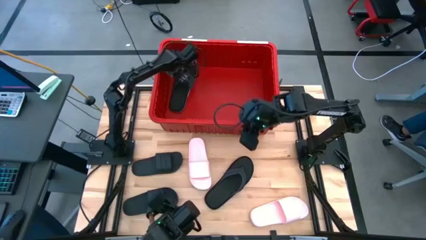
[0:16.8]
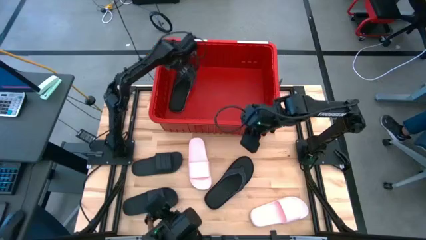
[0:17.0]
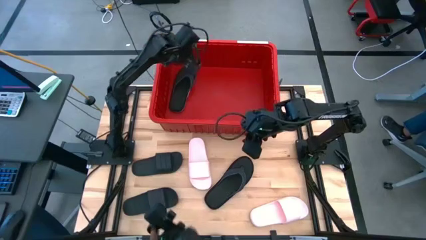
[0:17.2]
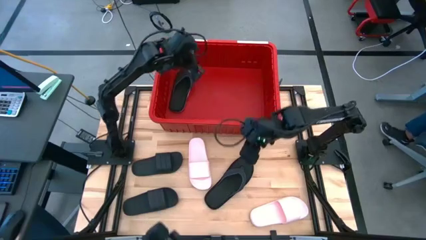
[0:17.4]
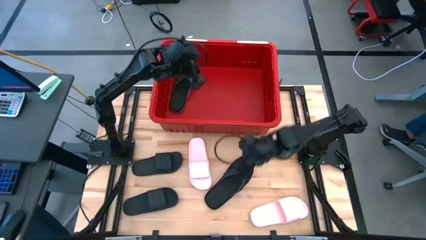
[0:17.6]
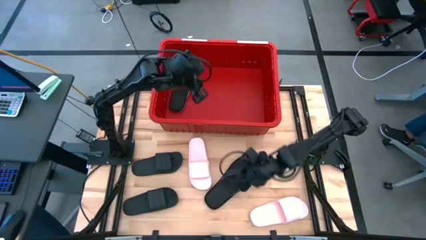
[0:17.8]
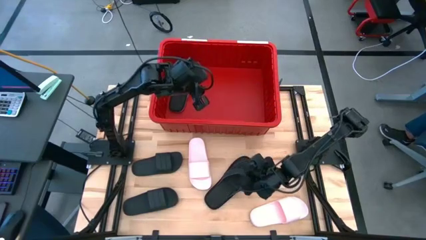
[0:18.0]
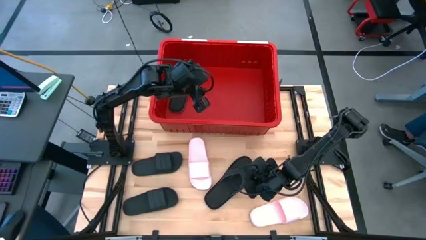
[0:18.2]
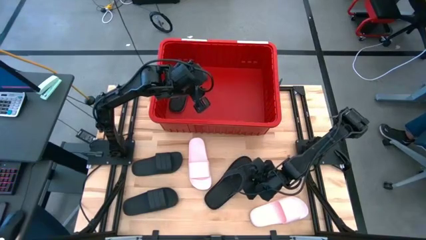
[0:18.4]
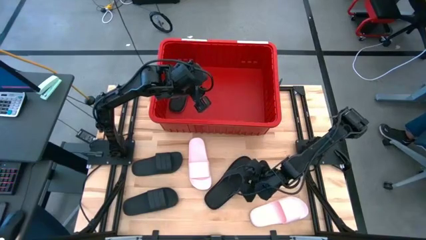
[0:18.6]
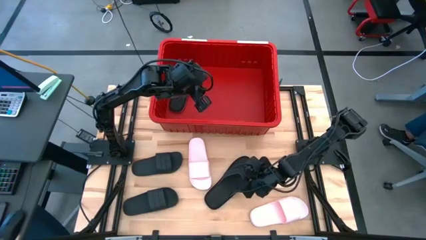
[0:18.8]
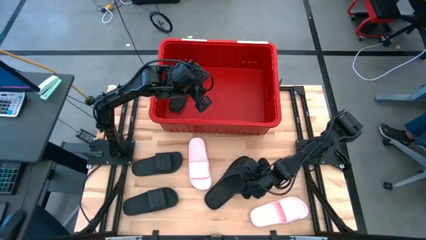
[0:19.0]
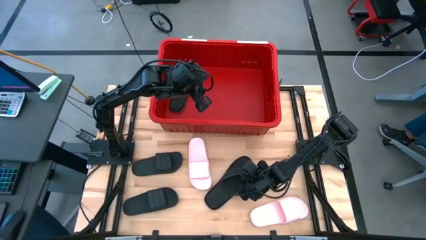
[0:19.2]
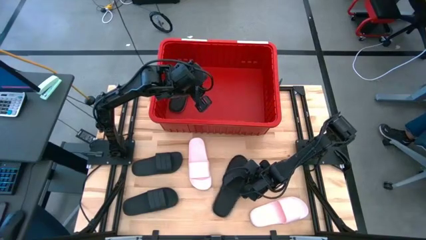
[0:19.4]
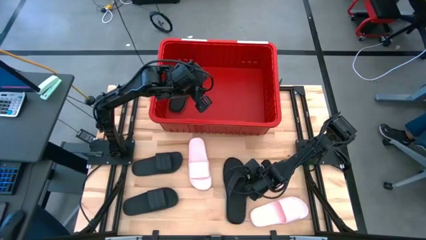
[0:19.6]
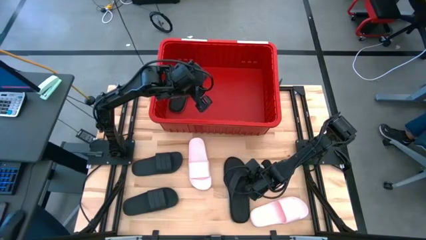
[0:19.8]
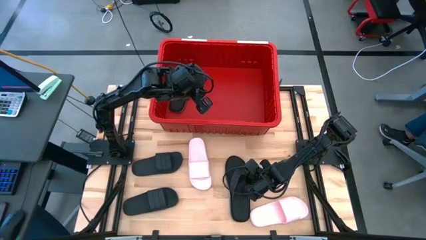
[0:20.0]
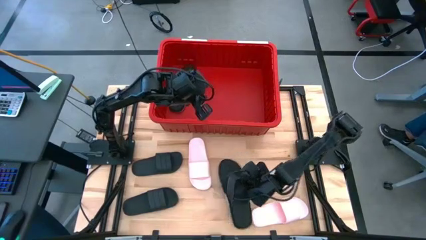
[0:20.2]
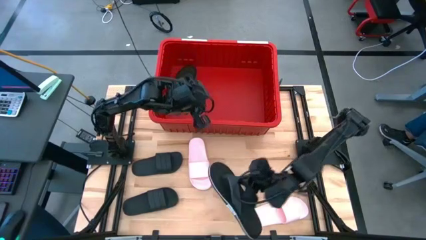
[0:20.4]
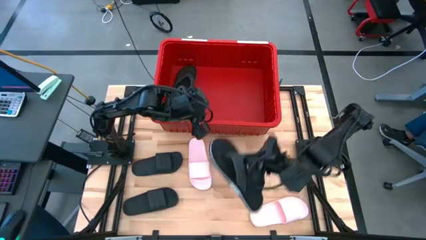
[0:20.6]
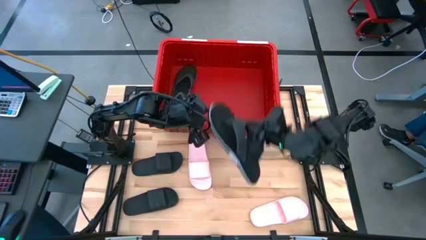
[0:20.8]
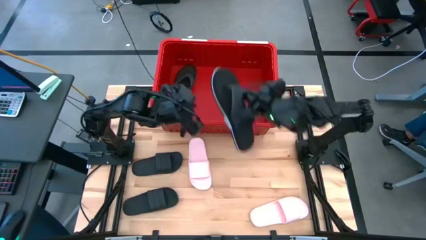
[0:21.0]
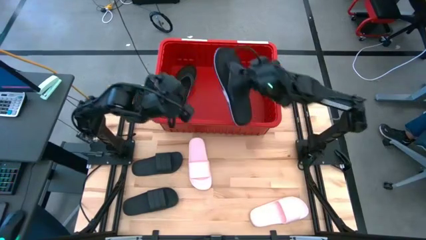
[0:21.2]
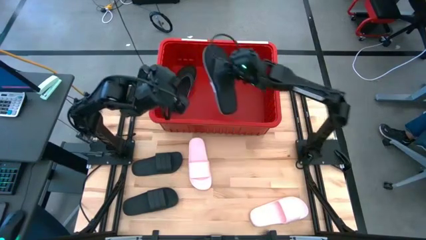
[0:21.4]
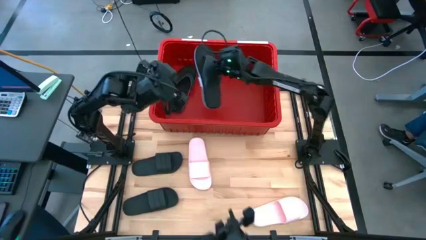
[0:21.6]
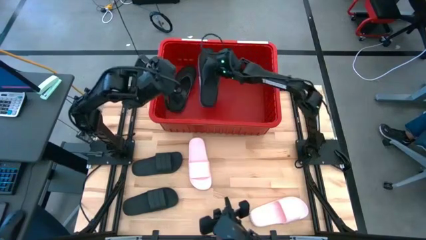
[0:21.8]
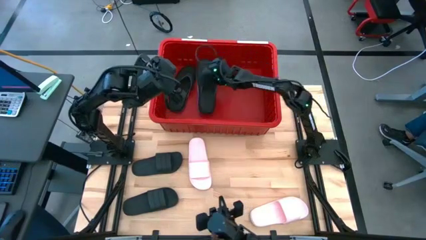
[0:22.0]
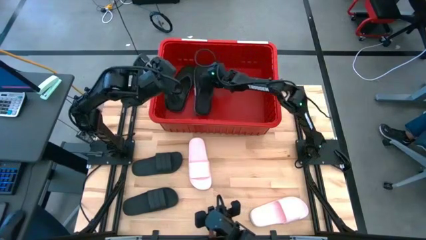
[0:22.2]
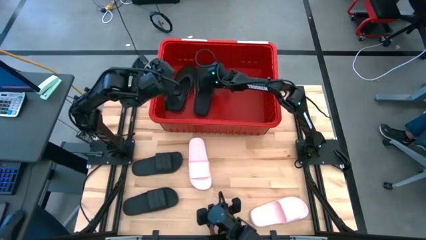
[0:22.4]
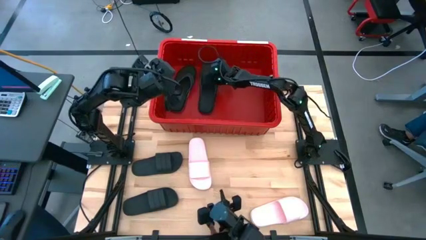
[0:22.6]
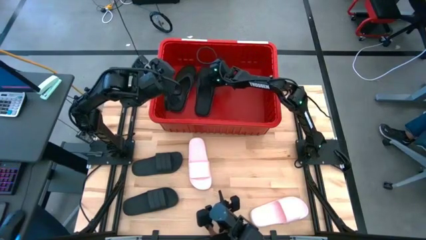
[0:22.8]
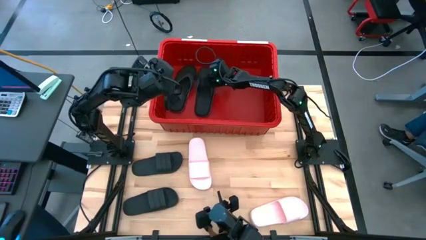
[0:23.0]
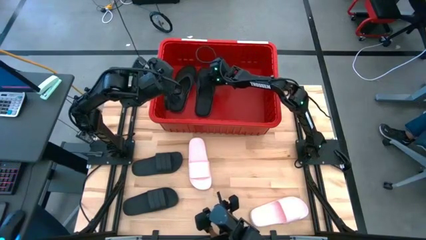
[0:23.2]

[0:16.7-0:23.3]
Task: Pick and place slides into bin
Put the black slipper into the red bin

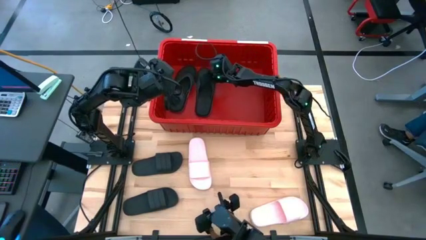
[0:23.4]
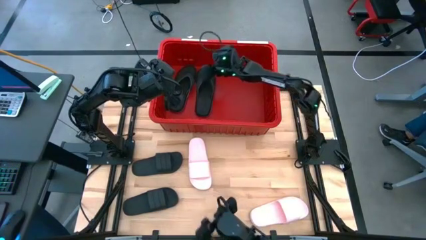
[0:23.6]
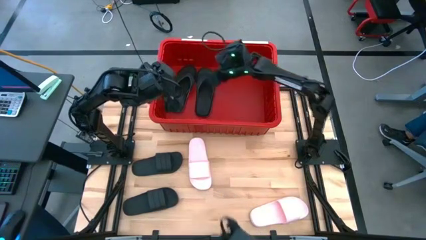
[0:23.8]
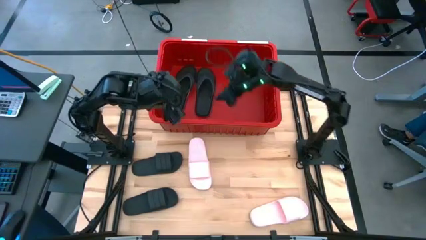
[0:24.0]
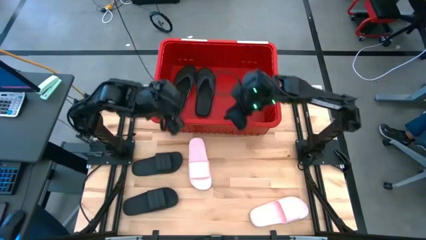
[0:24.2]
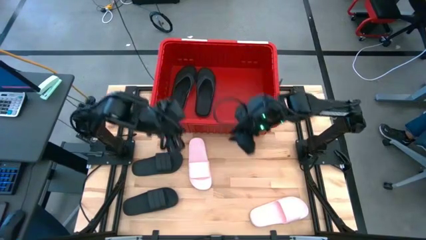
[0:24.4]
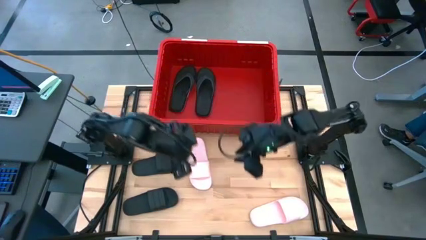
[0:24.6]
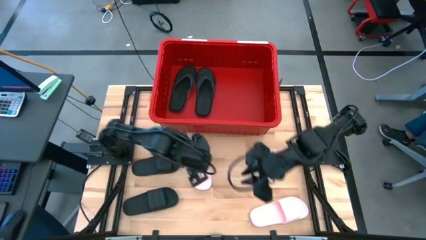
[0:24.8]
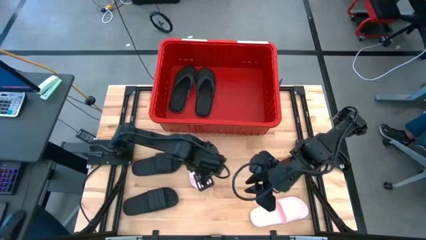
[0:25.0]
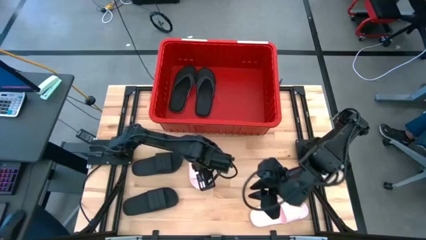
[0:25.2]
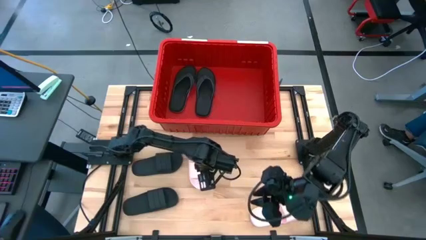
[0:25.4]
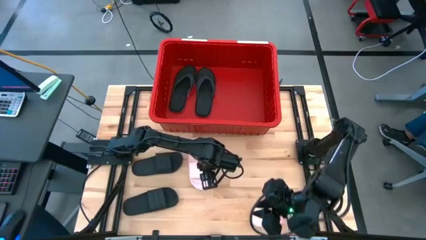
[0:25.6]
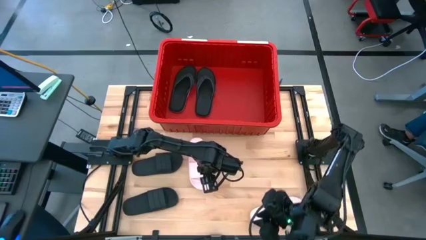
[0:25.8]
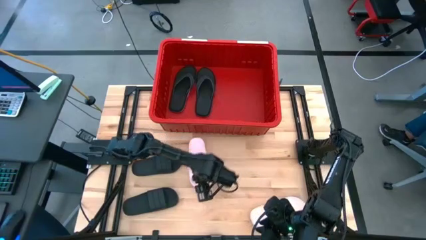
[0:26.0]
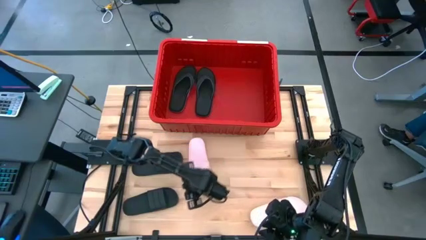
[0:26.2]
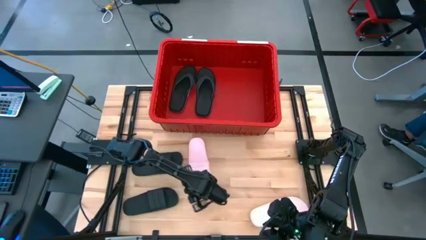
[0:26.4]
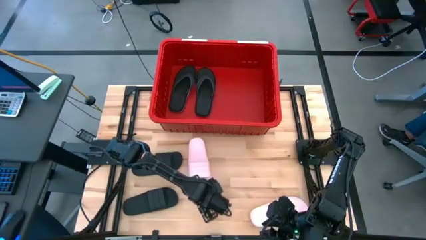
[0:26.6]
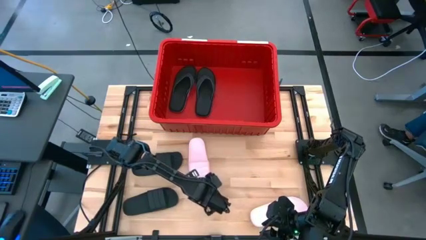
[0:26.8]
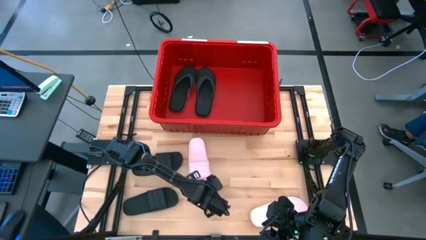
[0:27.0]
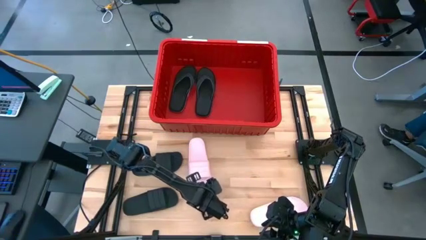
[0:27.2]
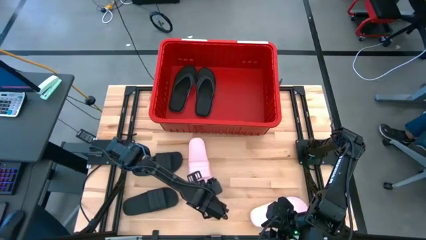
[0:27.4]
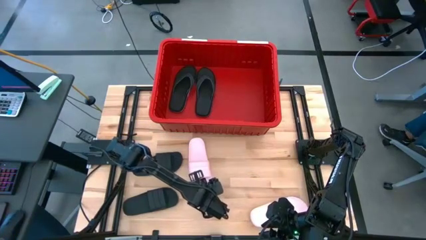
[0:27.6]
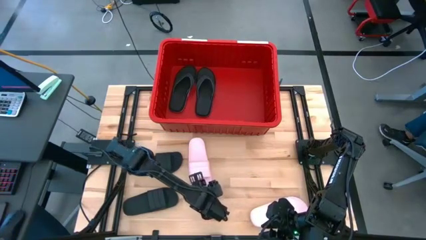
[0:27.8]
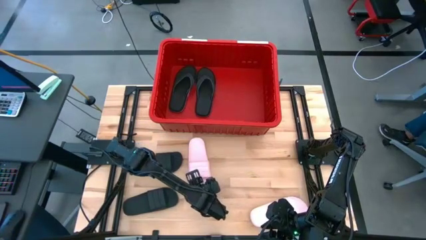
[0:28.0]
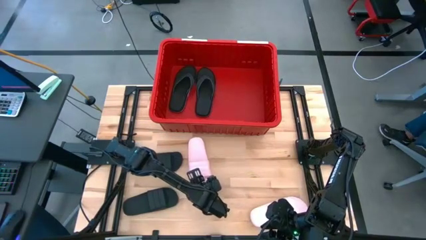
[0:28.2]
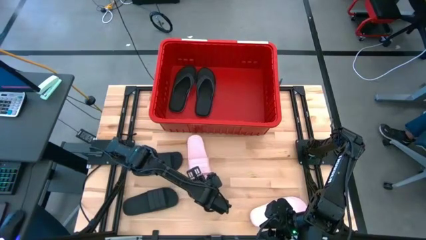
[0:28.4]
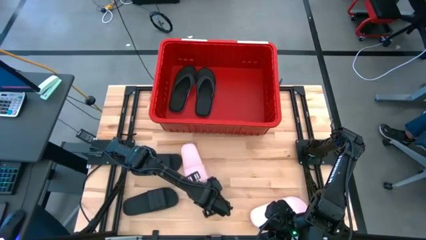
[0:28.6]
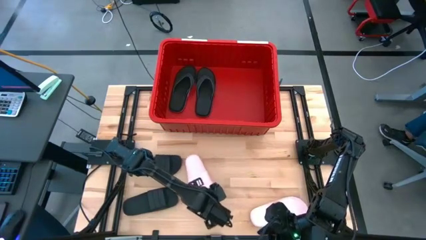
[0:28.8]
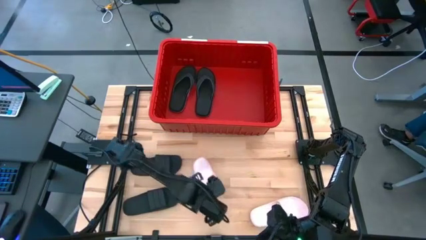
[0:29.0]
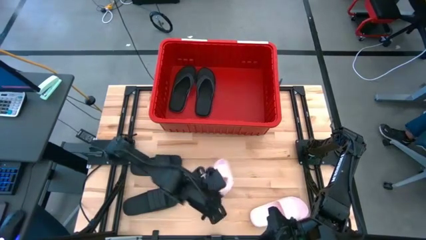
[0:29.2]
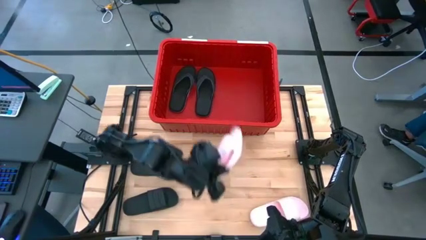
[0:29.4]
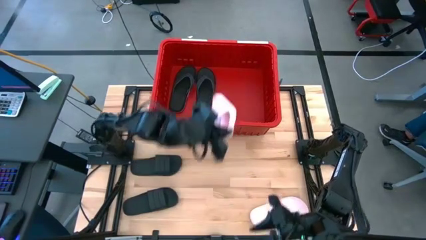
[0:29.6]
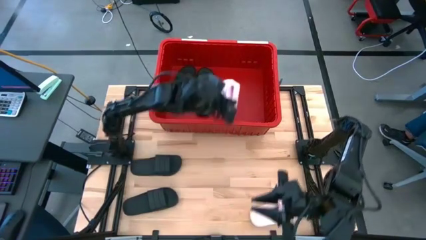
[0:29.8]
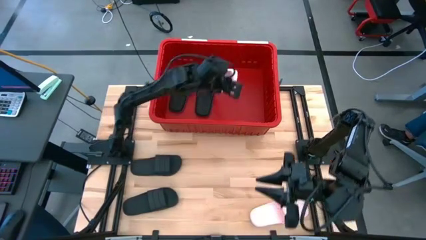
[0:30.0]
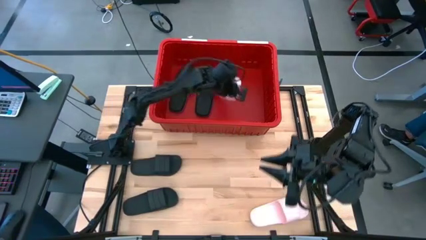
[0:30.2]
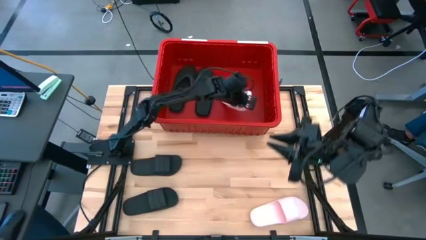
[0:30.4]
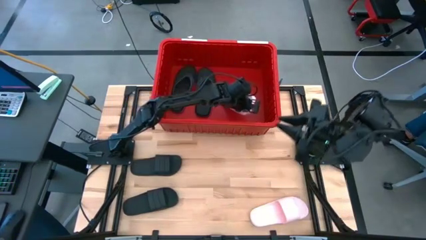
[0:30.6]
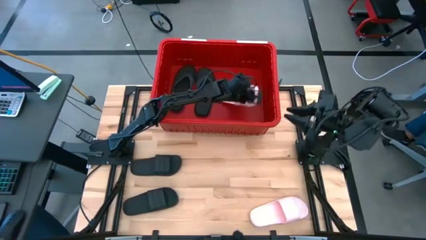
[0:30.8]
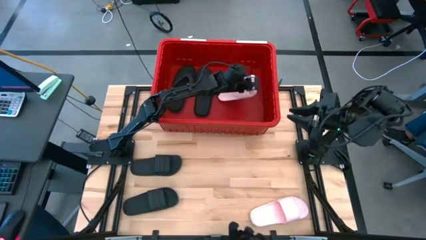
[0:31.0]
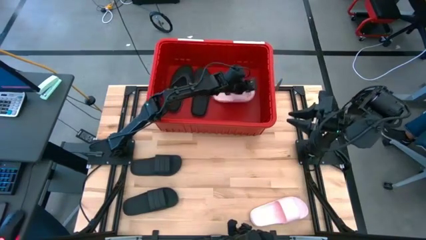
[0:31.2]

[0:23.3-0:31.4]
Put the left pink slide into the red bin
